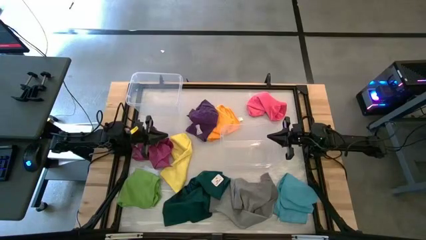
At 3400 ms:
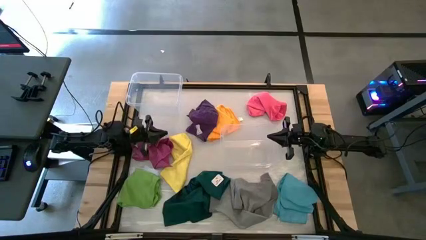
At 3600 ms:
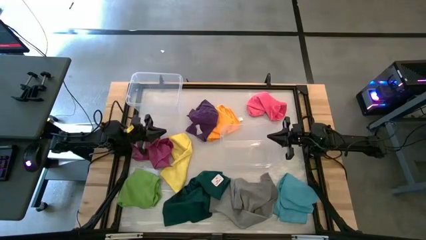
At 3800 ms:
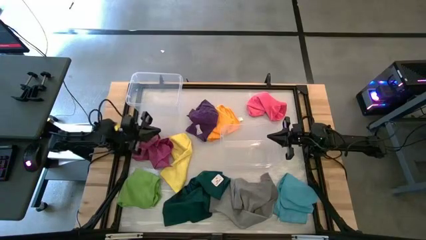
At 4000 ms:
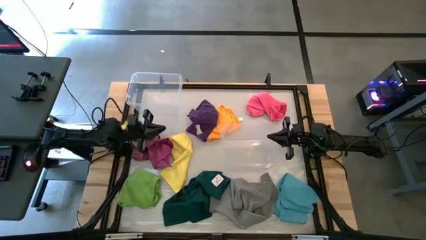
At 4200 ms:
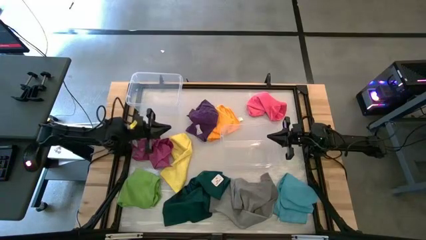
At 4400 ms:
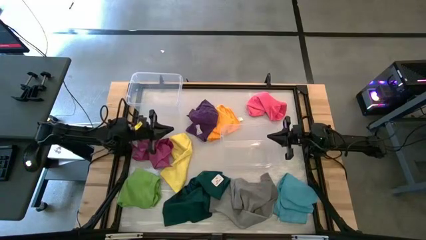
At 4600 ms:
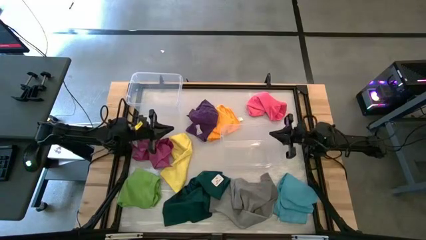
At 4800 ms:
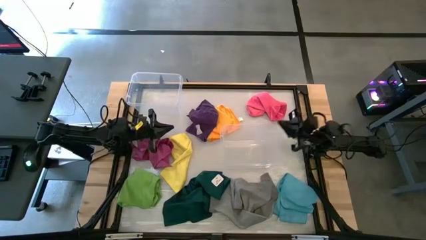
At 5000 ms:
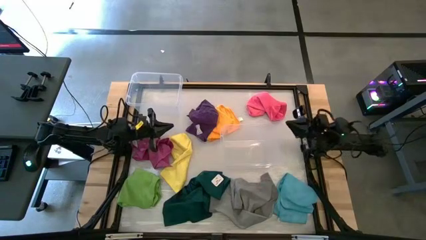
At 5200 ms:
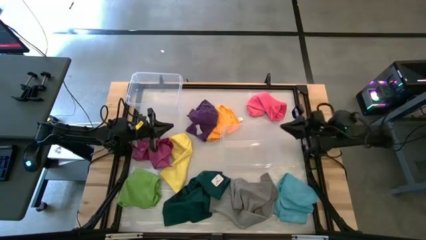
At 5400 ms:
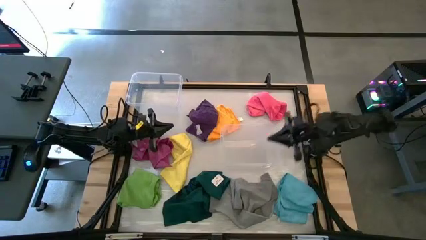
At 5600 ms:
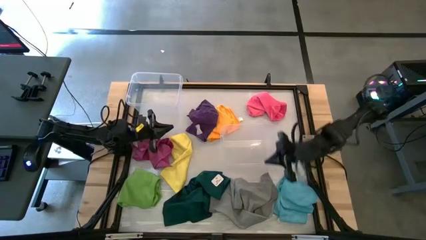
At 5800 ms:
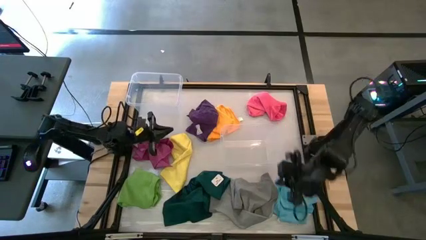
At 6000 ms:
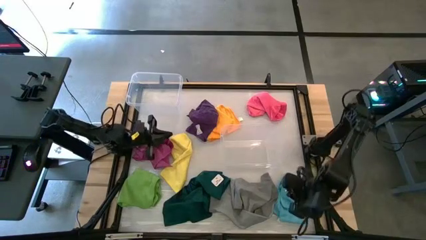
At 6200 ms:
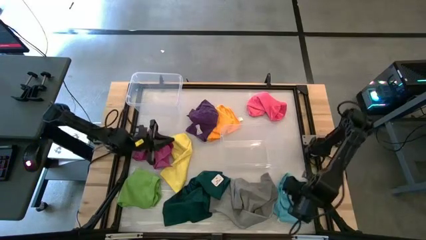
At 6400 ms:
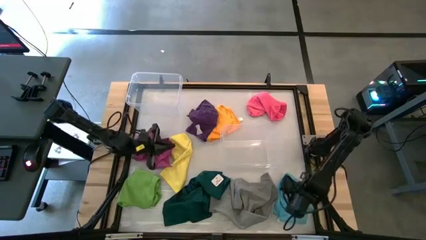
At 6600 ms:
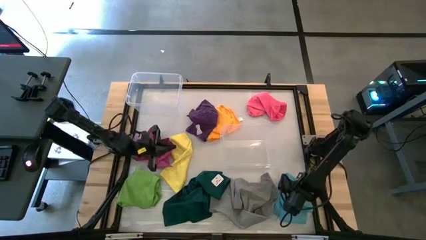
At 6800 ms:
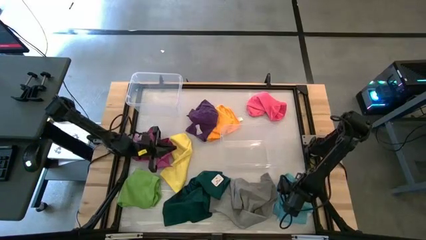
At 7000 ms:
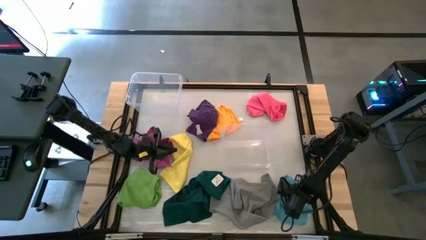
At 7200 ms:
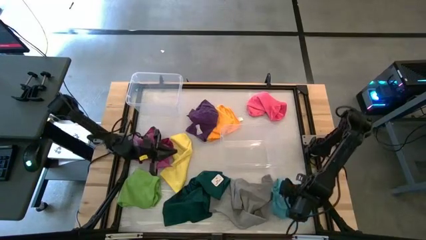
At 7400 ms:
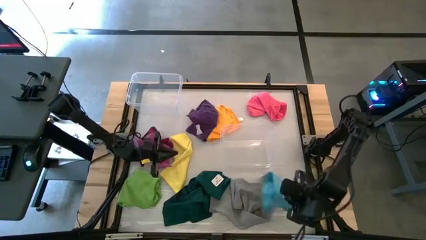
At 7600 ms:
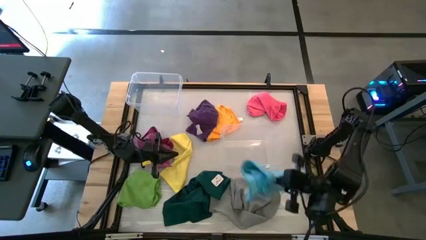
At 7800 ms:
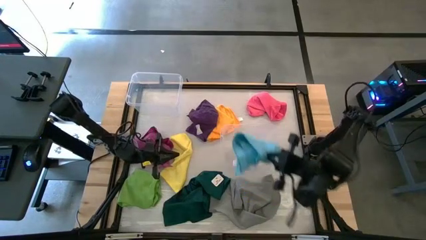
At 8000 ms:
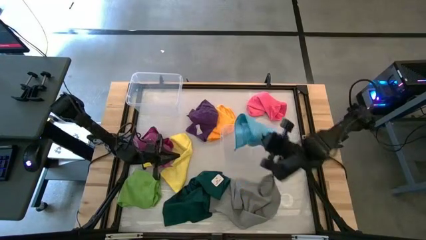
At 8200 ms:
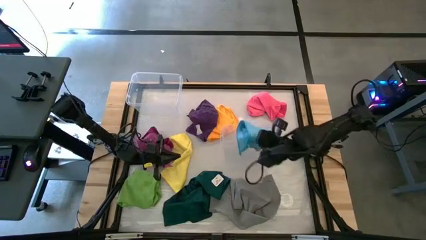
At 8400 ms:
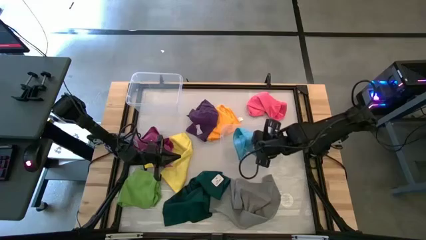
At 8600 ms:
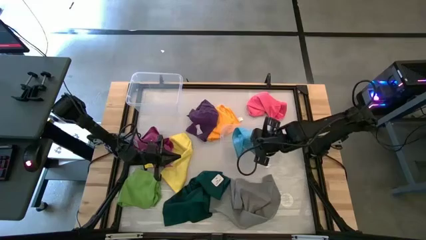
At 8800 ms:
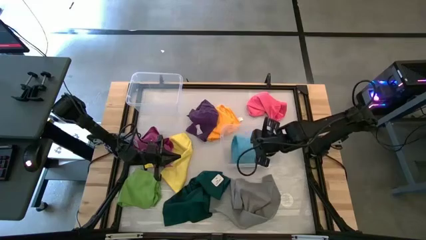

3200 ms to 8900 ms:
Task: Sort towels by color in basket
Put the blue towel into the bottom transparent bin

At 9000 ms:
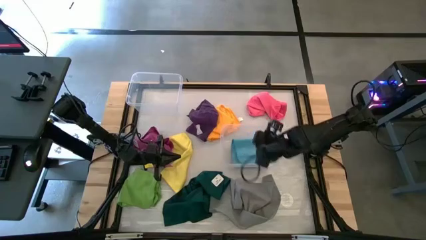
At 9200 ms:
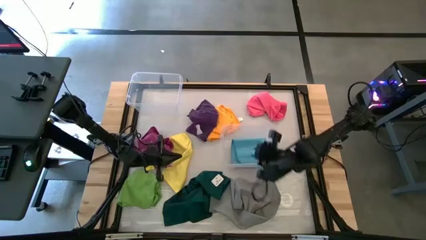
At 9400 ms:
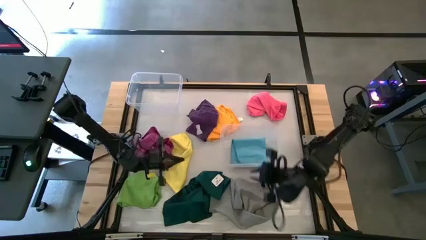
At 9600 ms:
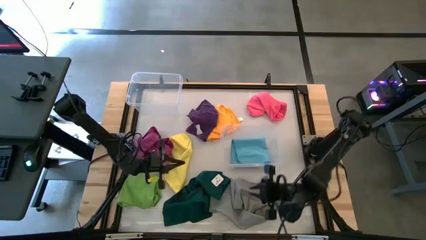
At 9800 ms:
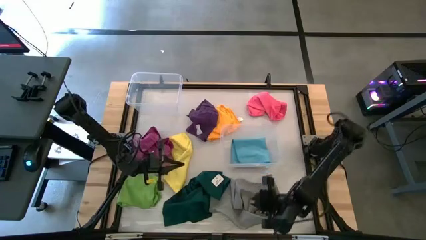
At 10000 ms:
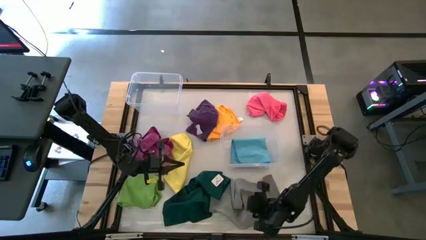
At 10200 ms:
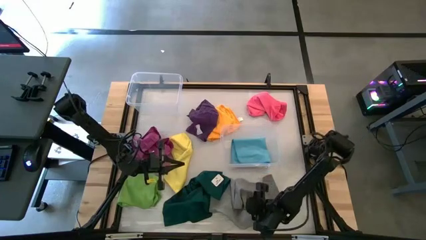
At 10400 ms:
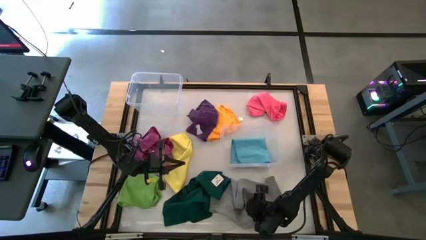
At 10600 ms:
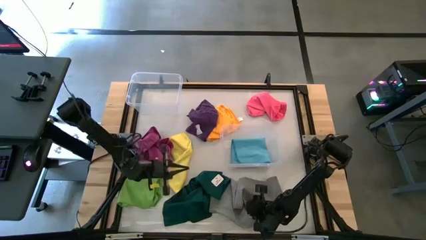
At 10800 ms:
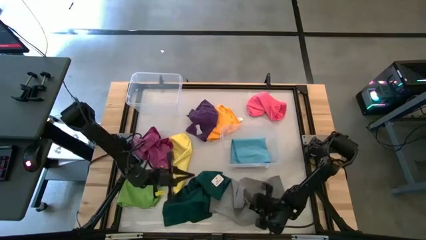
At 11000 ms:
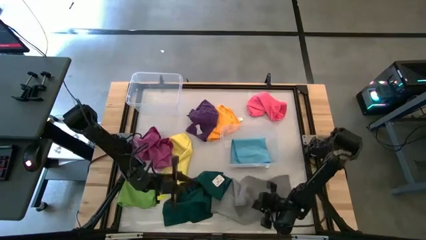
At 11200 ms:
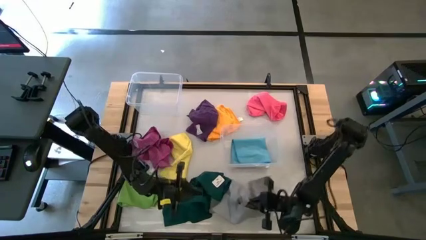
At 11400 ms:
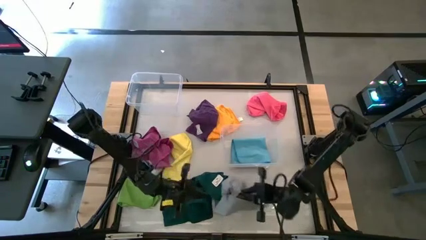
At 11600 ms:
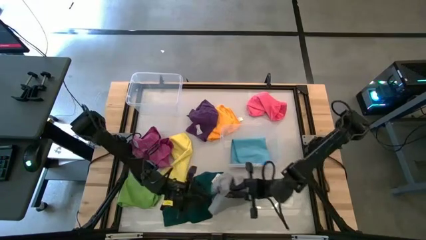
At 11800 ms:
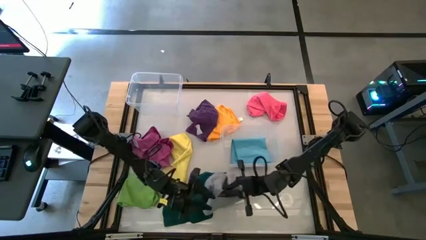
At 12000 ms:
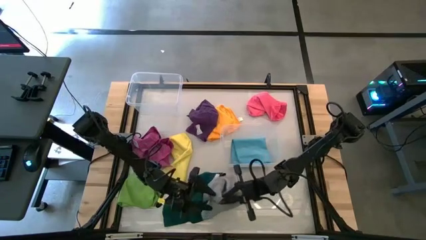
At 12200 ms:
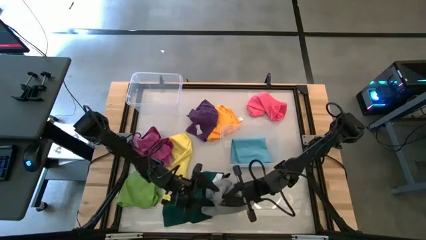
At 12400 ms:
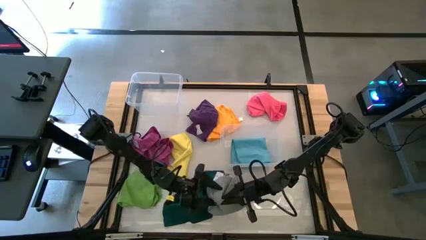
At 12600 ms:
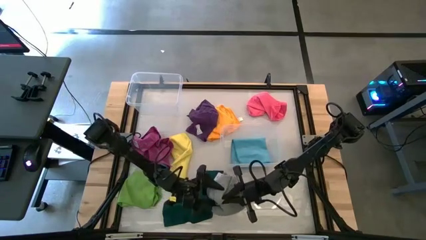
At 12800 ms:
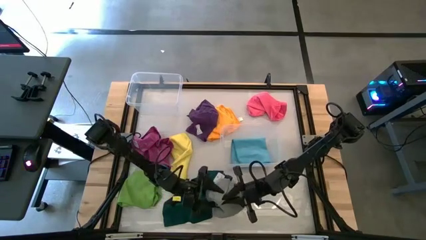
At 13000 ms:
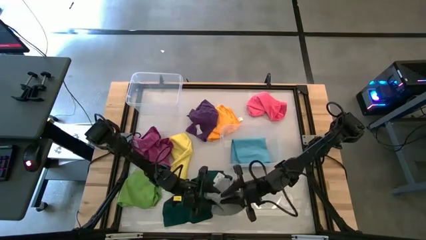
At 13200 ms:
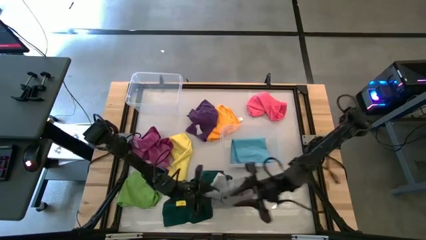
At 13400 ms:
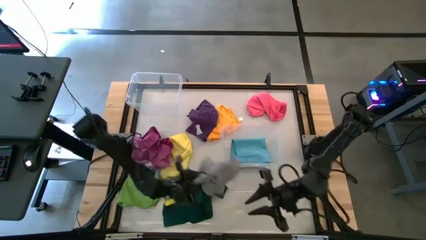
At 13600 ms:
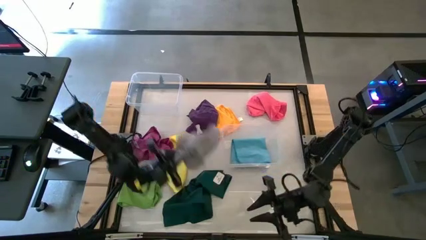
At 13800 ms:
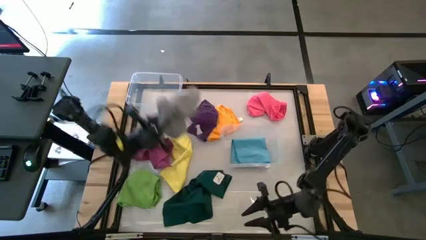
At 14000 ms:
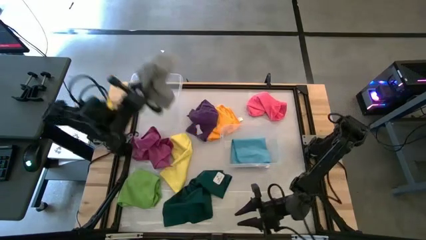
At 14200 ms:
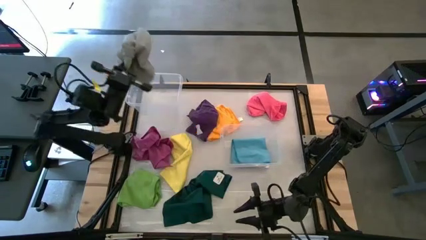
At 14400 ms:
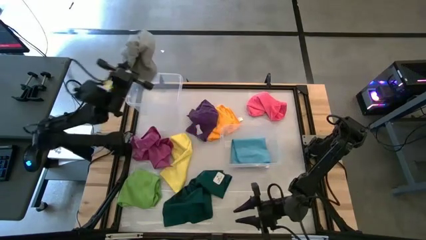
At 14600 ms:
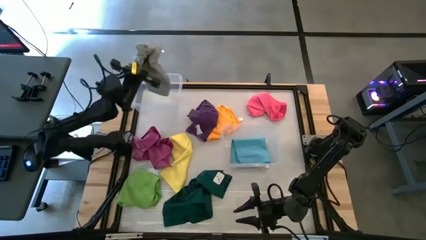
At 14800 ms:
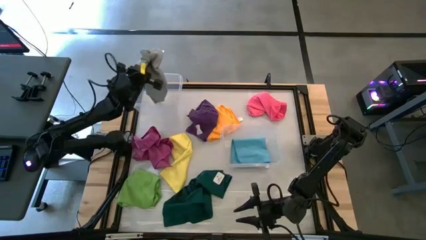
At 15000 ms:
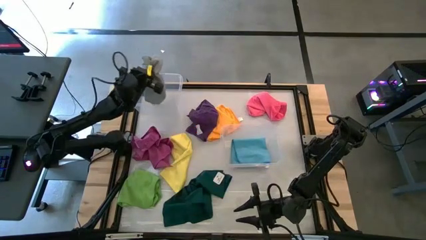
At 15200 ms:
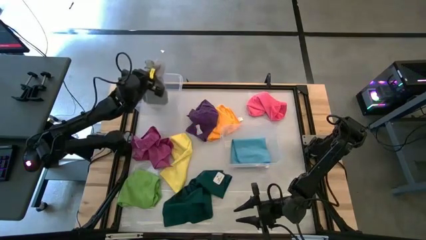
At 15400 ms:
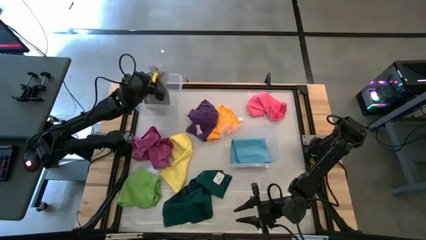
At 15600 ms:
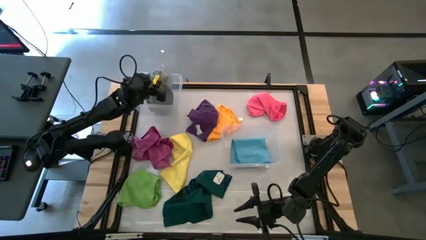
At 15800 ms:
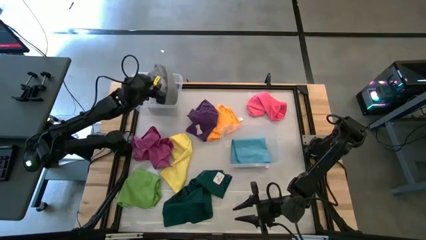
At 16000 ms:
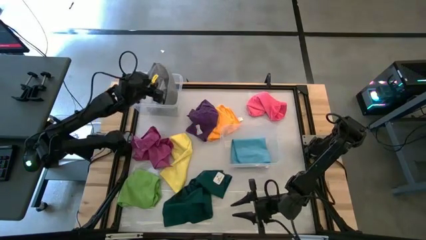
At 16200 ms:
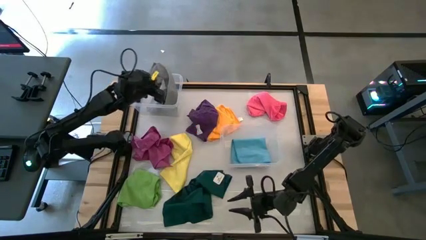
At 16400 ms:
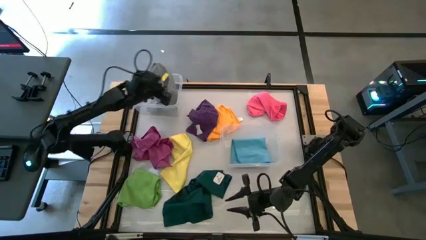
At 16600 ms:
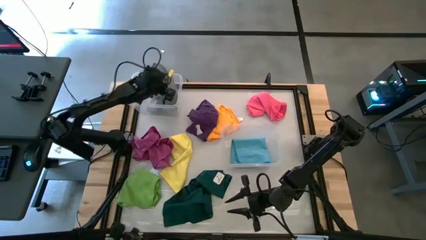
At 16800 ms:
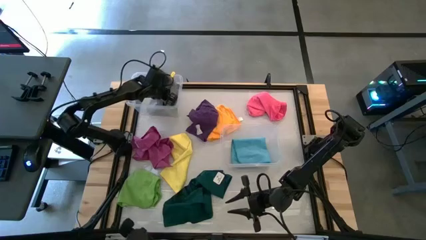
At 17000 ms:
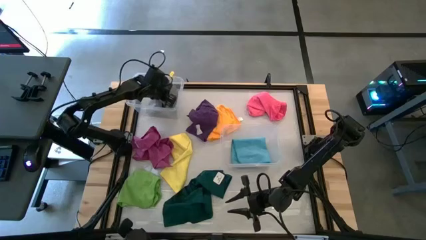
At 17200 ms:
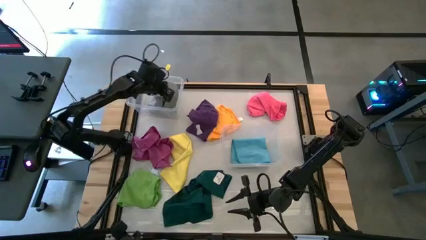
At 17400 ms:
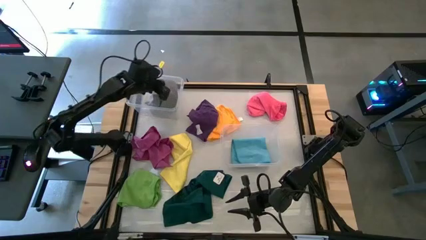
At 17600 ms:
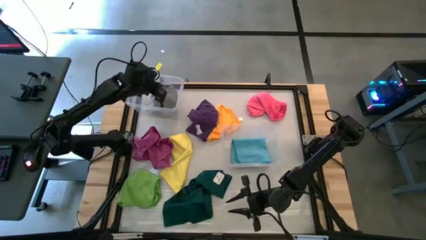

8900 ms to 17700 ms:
Put the gray towel into the top transparent bin

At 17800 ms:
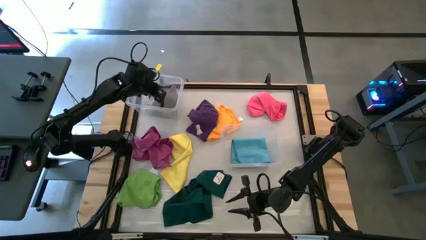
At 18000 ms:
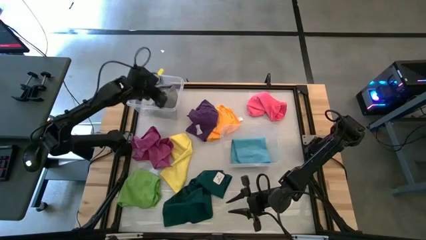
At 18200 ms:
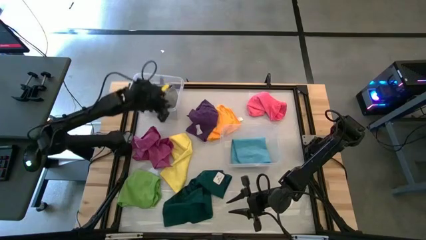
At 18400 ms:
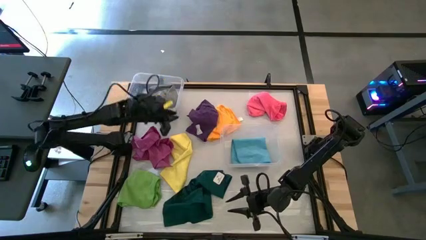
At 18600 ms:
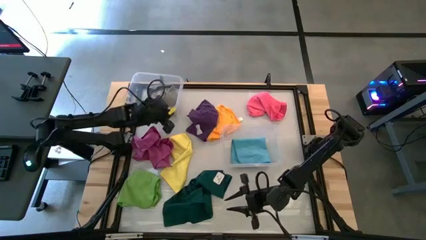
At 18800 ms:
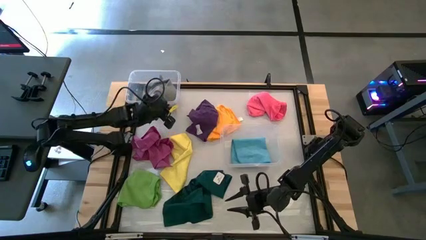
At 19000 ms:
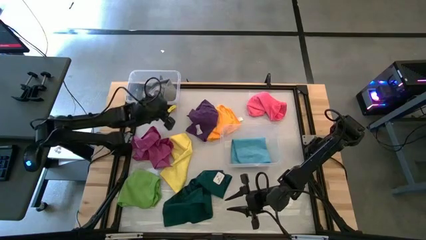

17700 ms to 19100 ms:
Adjust the top transparent bin

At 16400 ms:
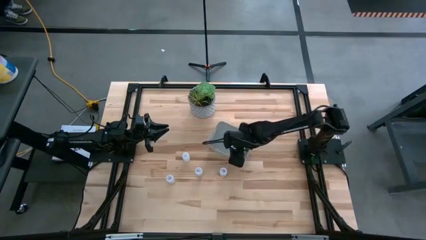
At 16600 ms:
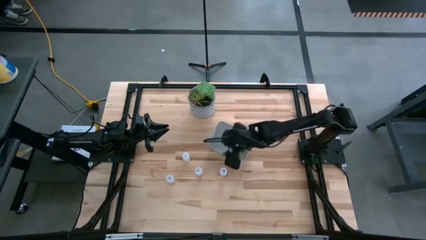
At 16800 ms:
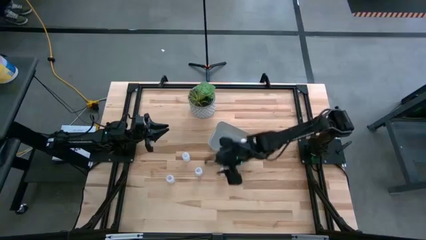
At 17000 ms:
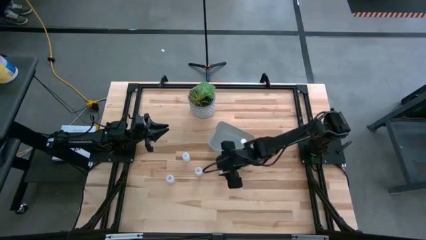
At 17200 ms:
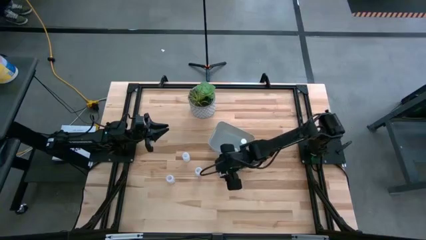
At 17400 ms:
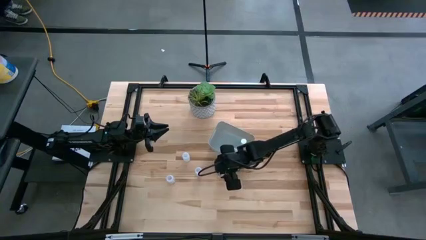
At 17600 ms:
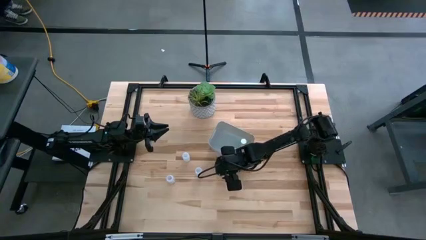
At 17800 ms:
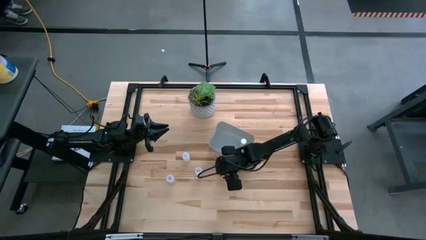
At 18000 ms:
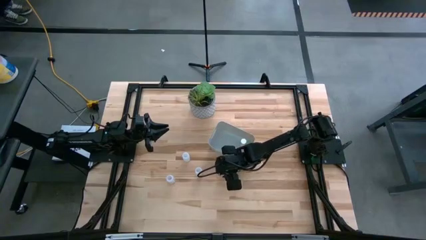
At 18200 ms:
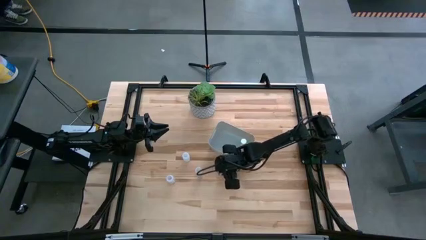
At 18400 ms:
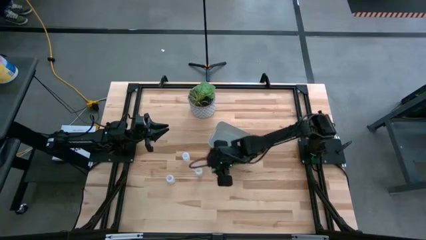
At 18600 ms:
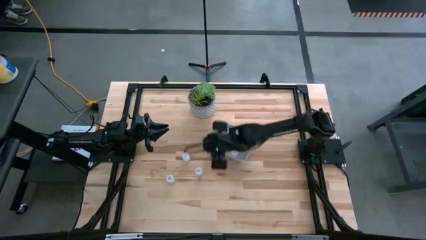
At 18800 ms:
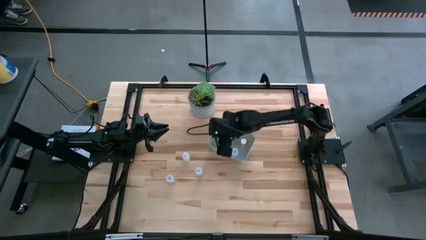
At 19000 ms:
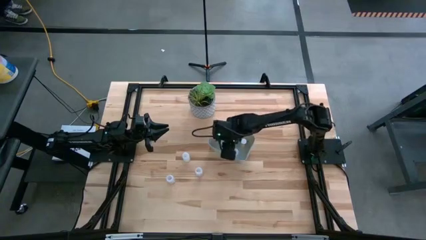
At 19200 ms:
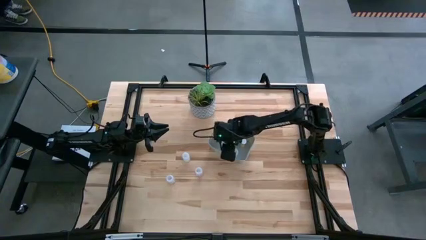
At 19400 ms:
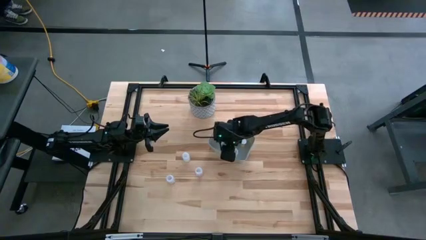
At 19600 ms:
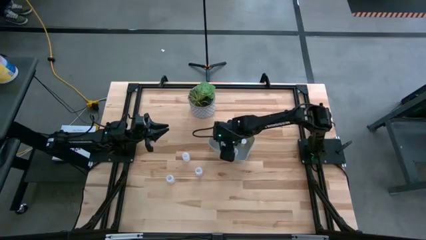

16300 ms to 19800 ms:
Task: Pick and place pill bottles into a basket
Put the right transparent capsule bottle into the white bin
